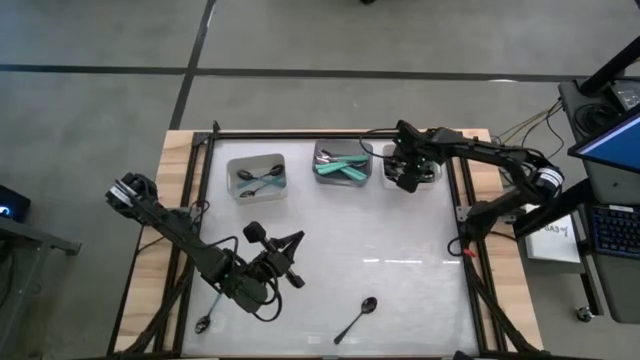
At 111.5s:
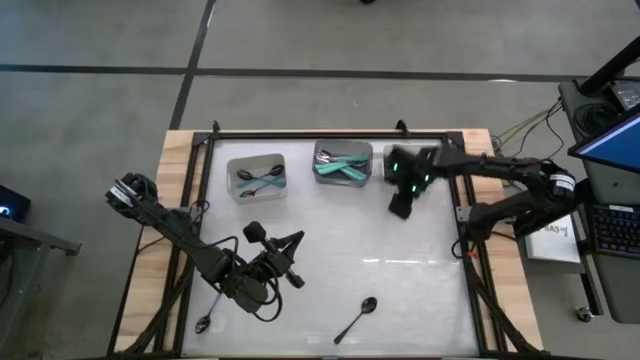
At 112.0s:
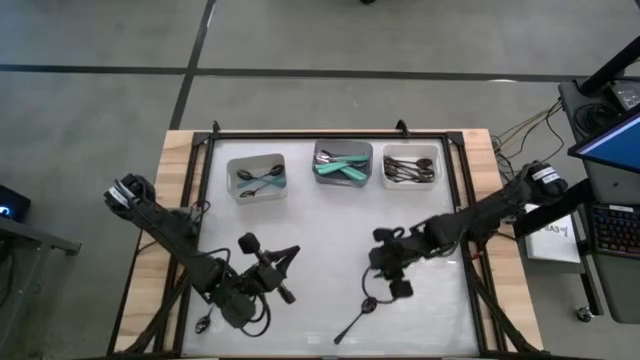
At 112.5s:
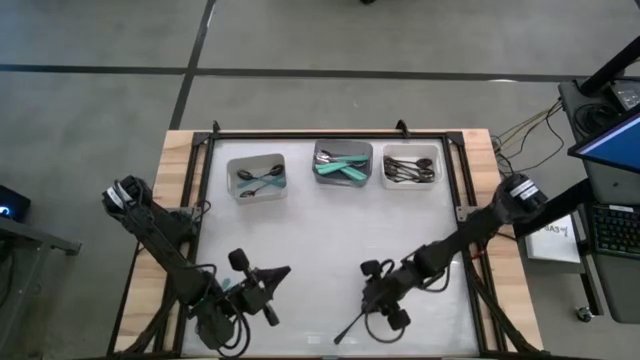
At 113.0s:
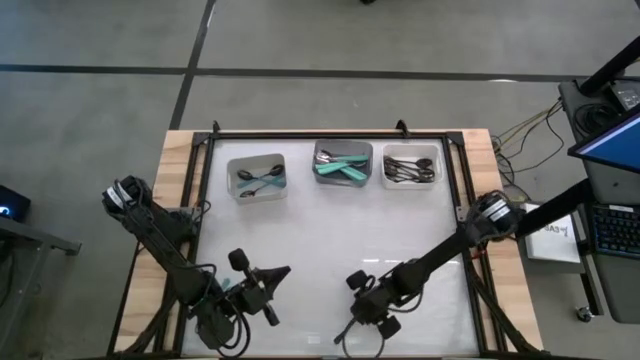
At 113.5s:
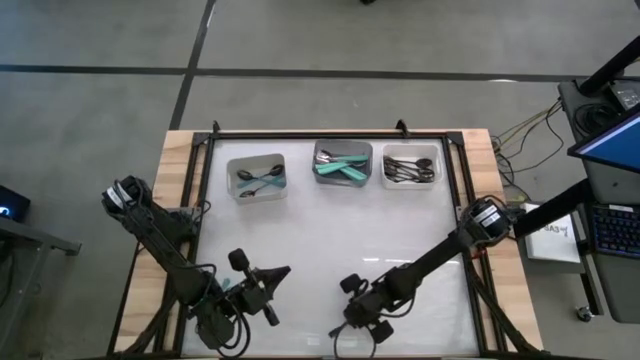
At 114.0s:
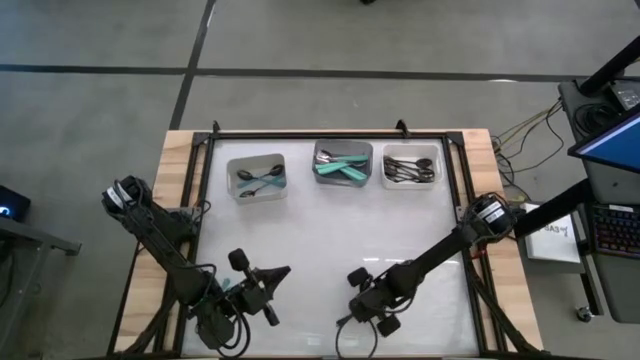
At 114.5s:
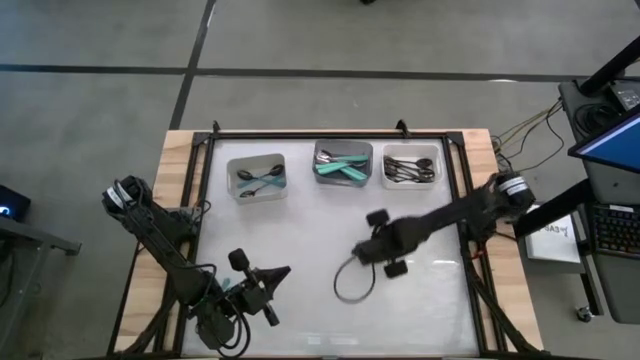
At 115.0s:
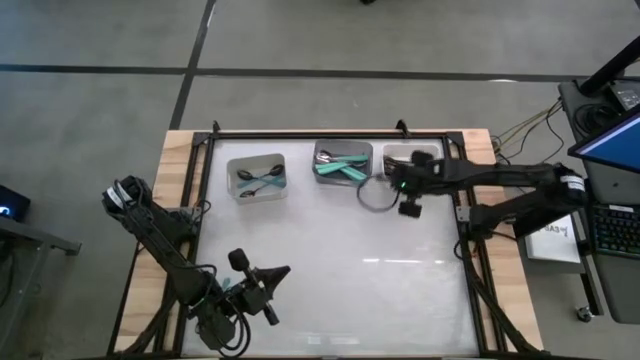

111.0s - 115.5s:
Task: Sort silverware by color (type)
Put the black spoon into the white bin

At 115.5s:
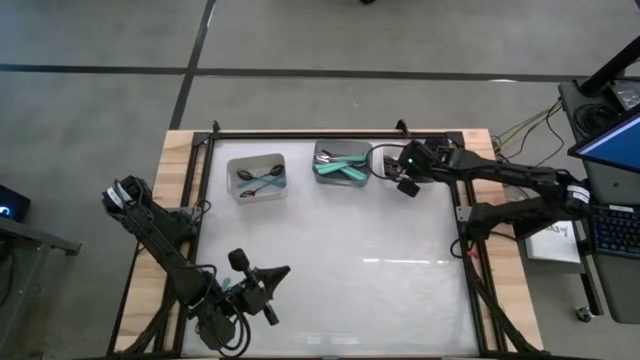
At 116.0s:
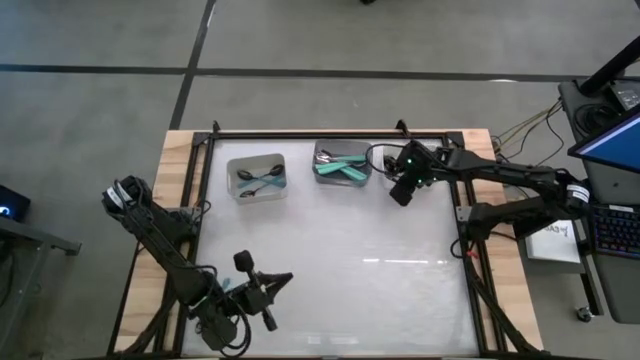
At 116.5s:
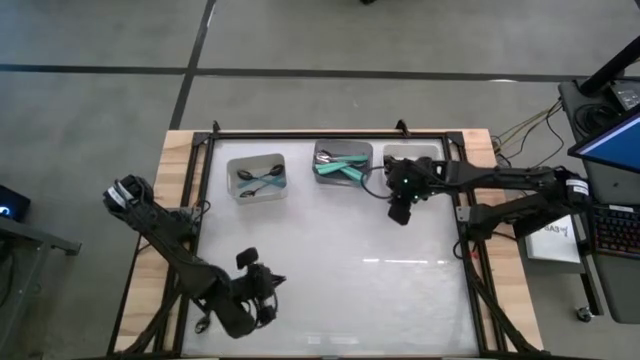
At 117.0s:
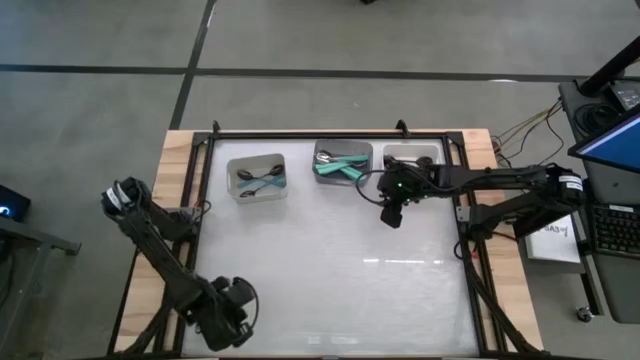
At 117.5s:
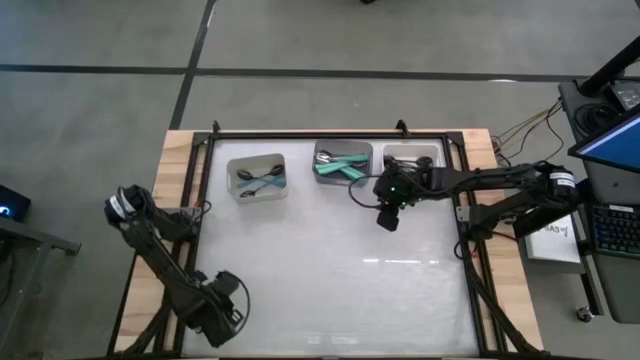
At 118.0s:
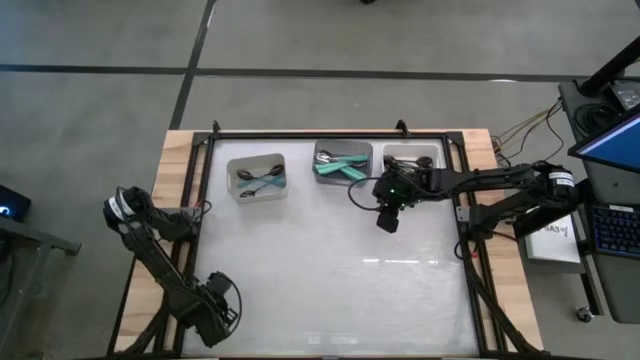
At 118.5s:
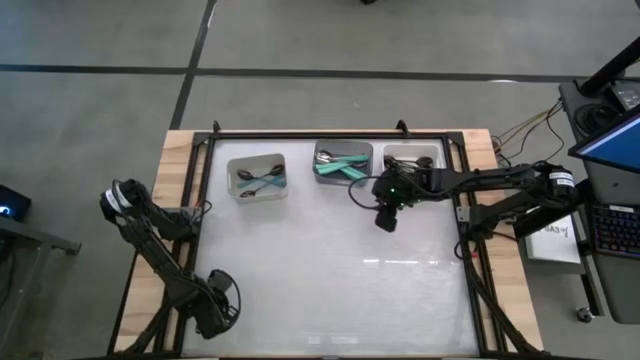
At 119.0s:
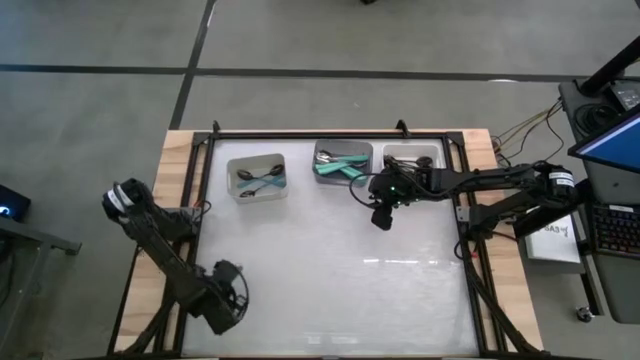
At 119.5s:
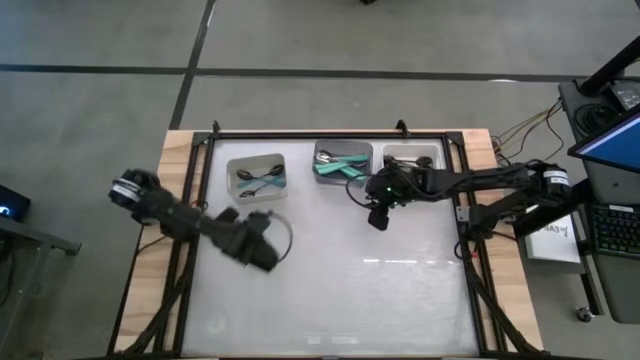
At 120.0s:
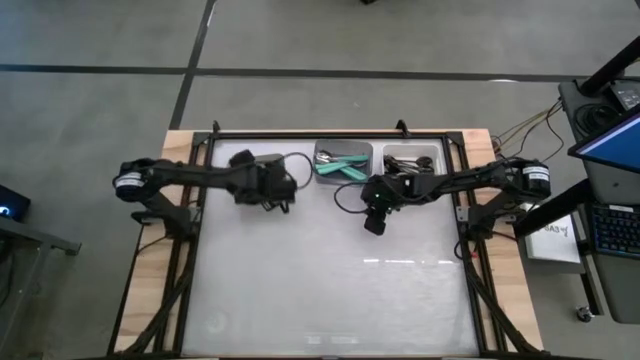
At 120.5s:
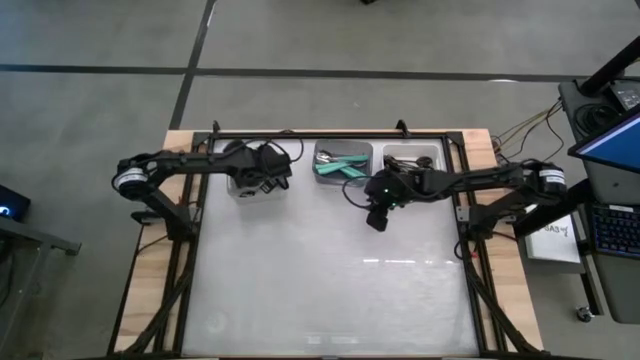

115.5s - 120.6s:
Put the blue spoon into the gray bin

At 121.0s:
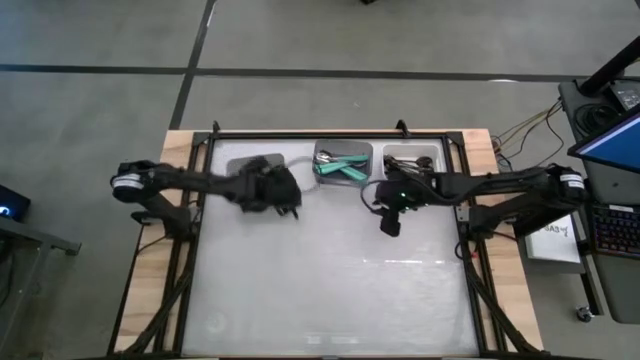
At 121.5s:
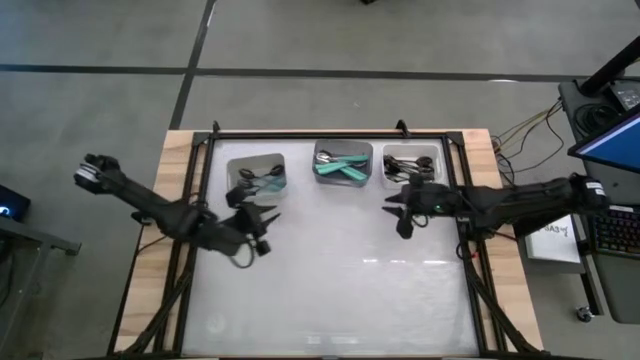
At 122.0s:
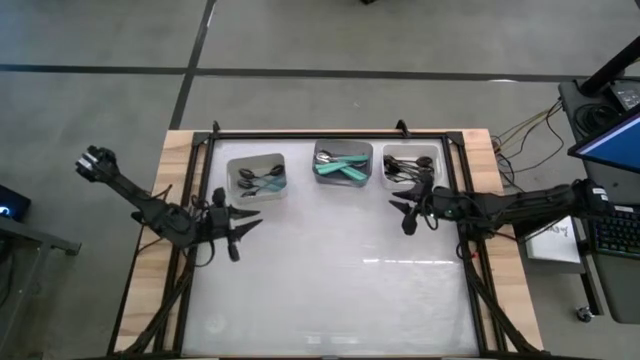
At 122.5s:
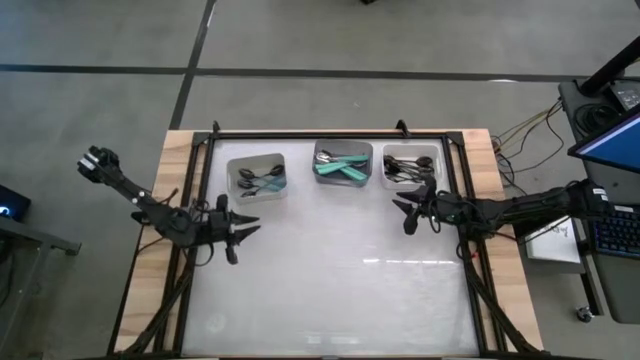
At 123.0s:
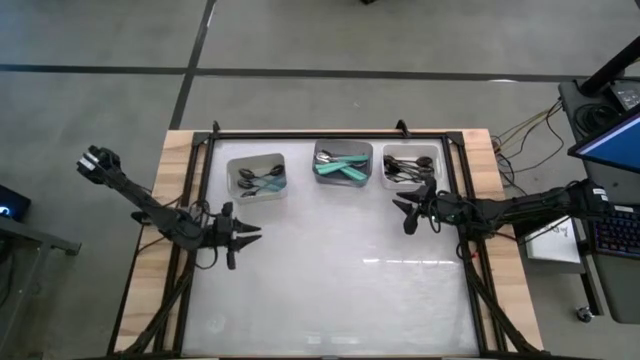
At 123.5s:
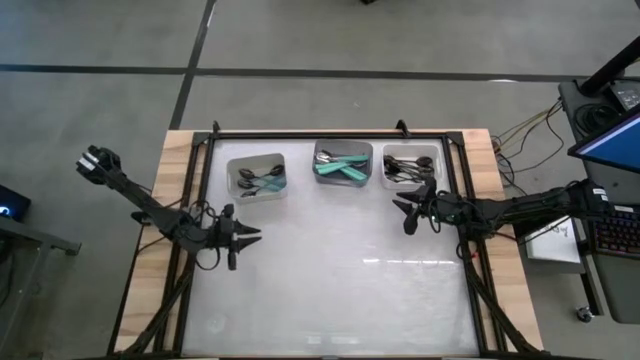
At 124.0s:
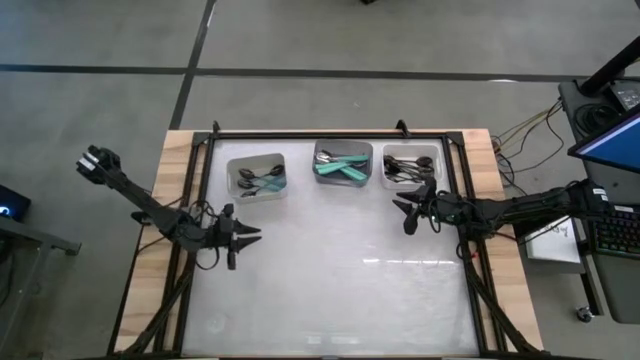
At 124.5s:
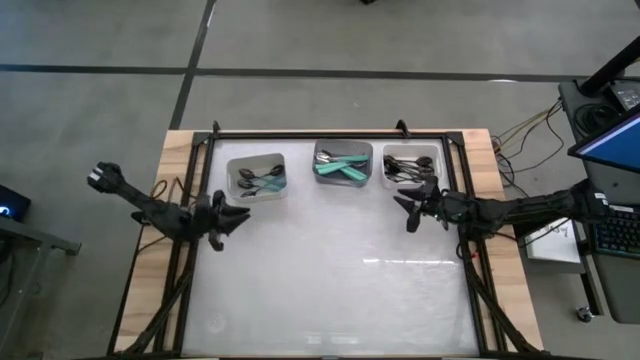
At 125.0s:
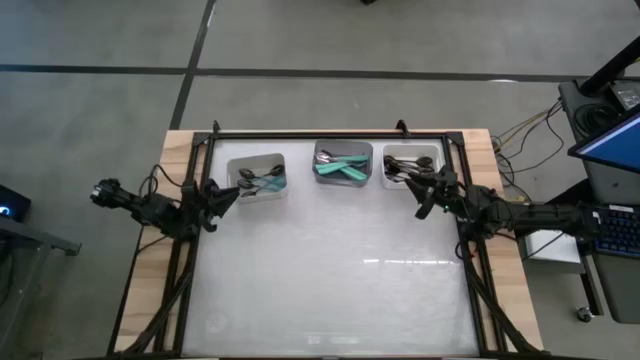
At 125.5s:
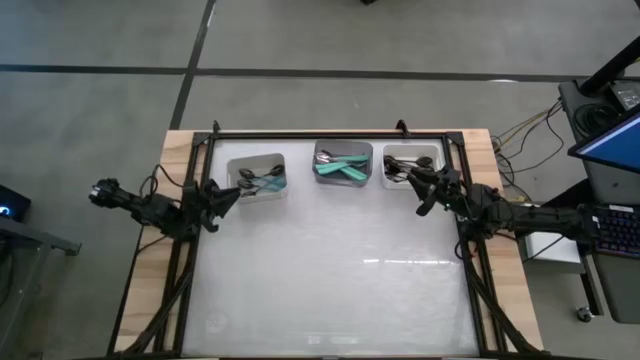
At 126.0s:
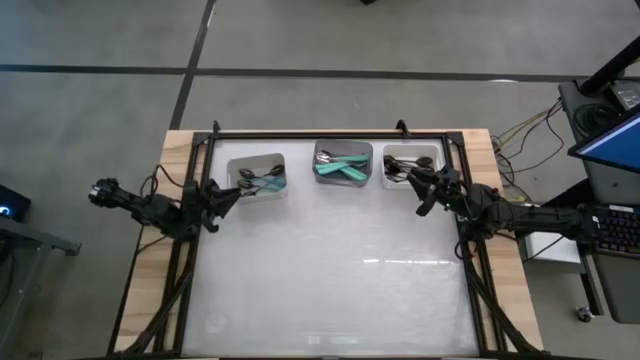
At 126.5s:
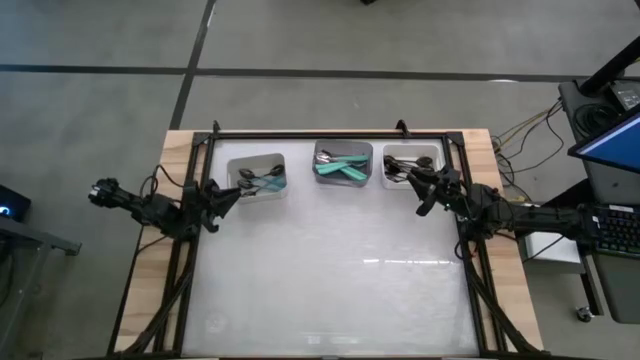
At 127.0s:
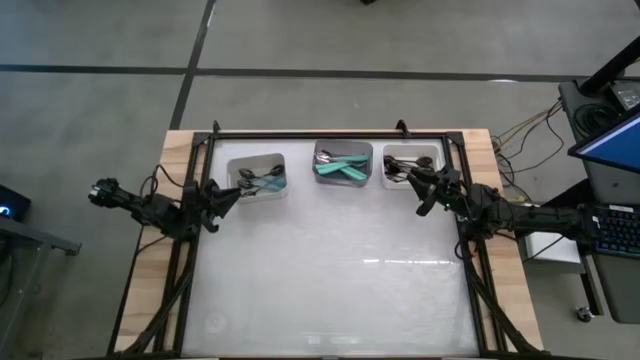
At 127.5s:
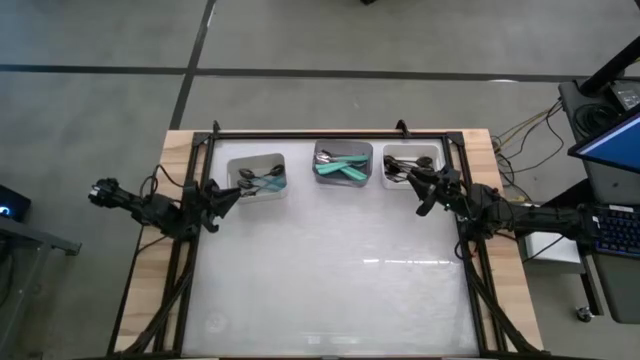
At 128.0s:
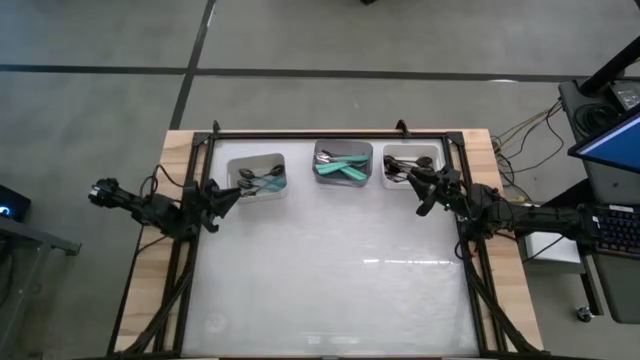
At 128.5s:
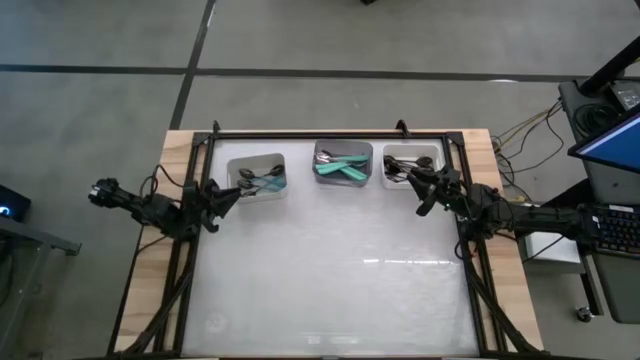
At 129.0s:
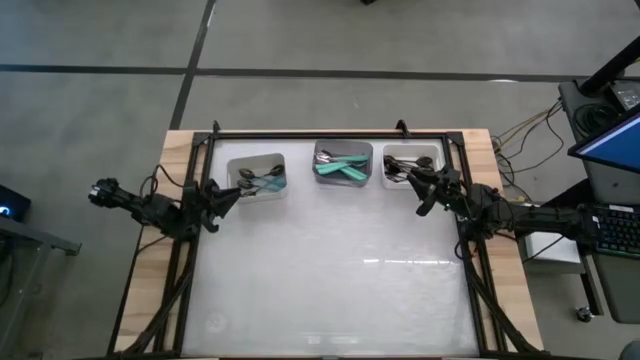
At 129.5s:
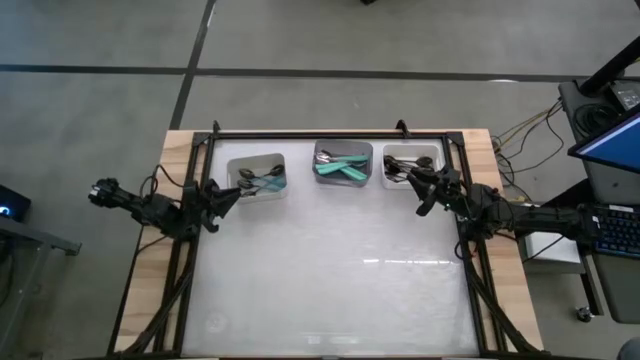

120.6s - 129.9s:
Return to Home Position

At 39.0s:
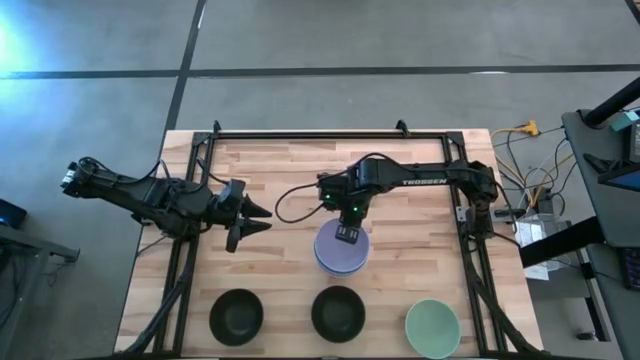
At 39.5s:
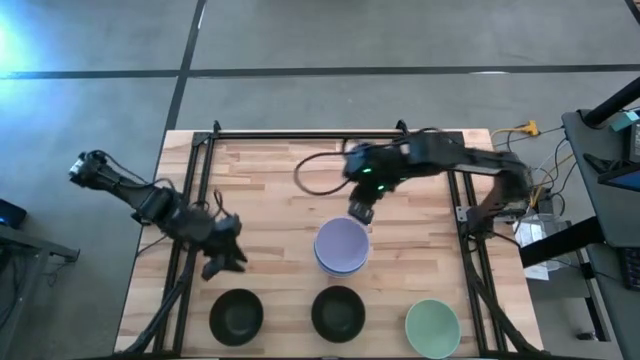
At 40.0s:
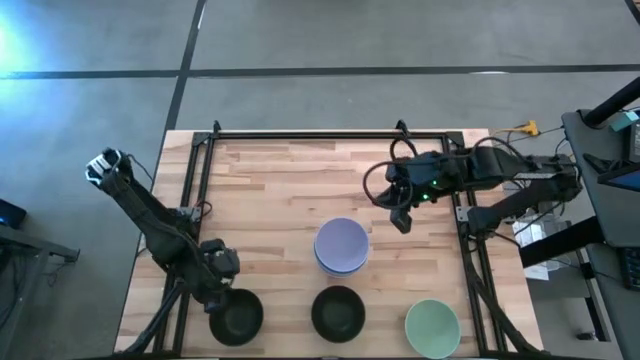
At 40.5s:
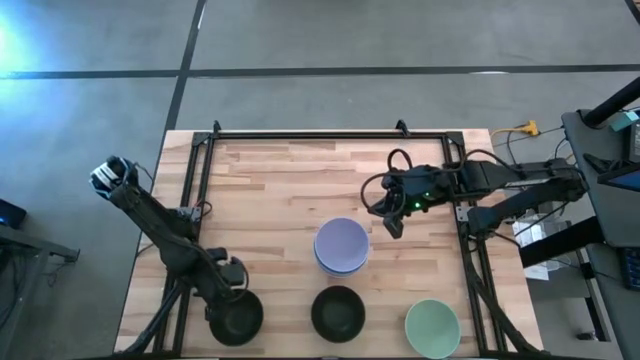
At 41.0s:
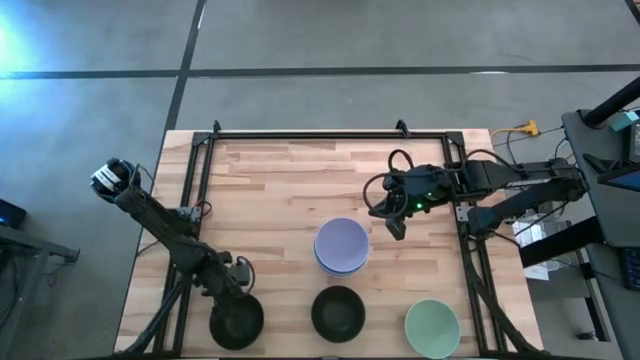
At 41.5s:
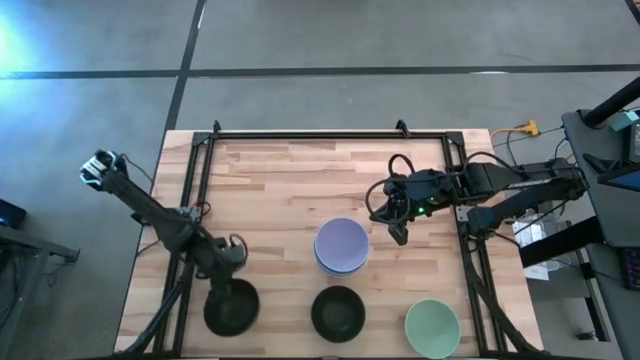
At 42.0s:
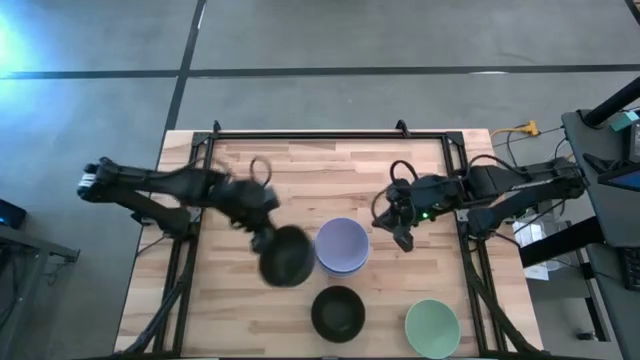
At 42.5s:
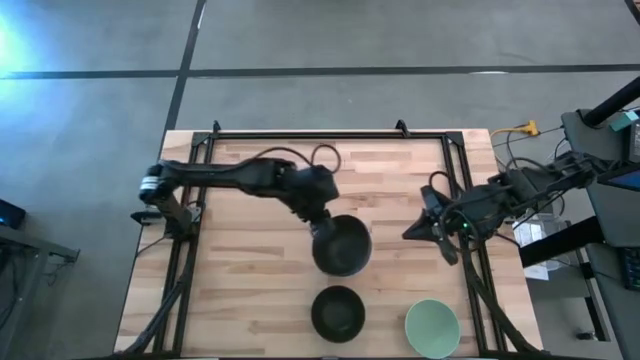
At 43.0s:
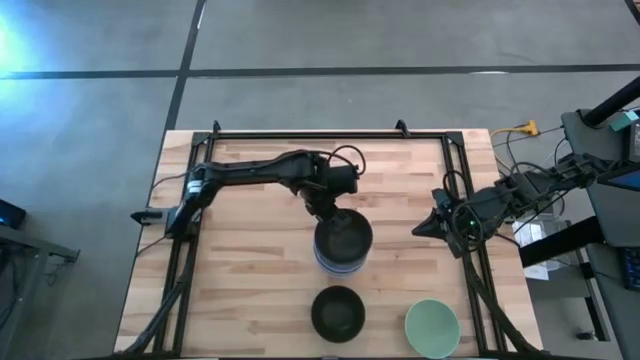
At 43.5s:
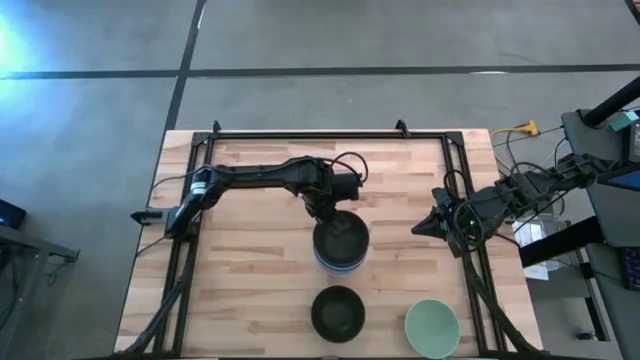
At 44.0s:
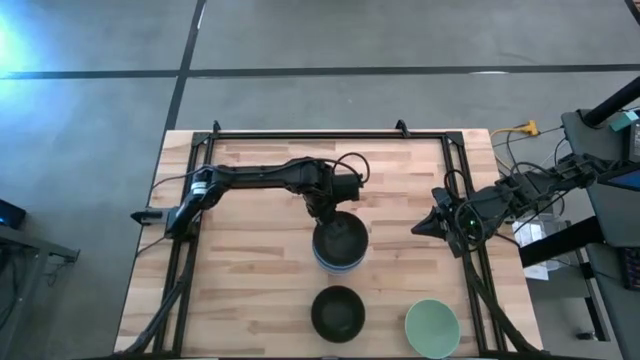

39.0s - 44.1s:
Task: Nest bowls inside each other
Stack the left black bowl on top of the purple bowl
